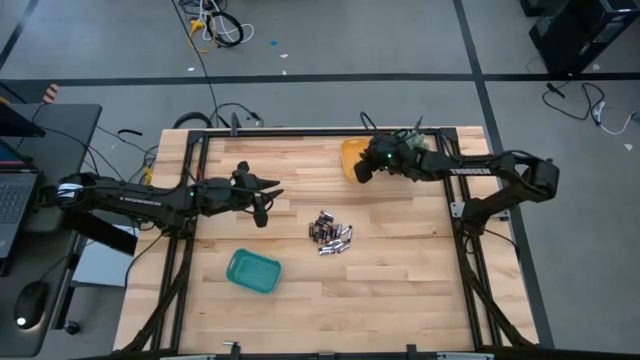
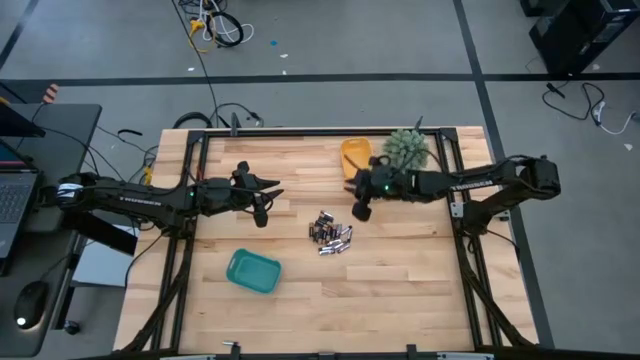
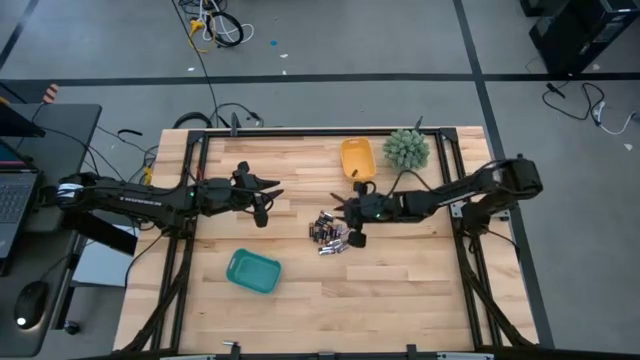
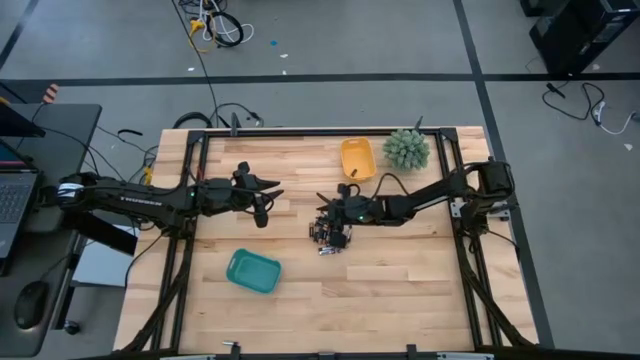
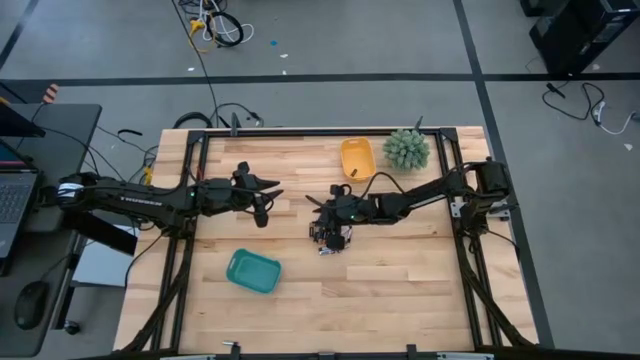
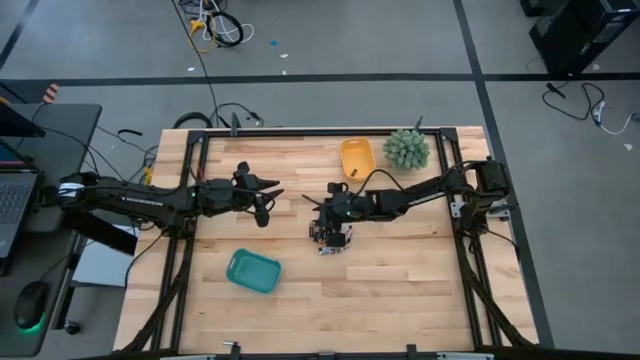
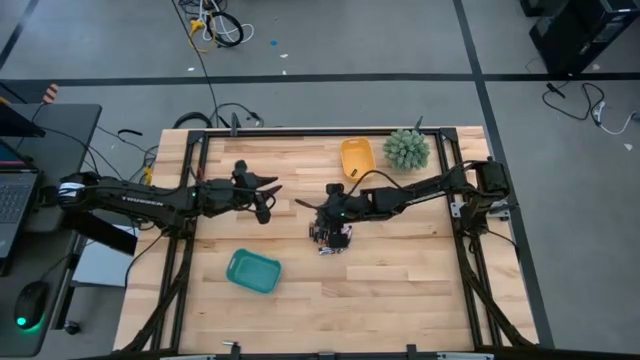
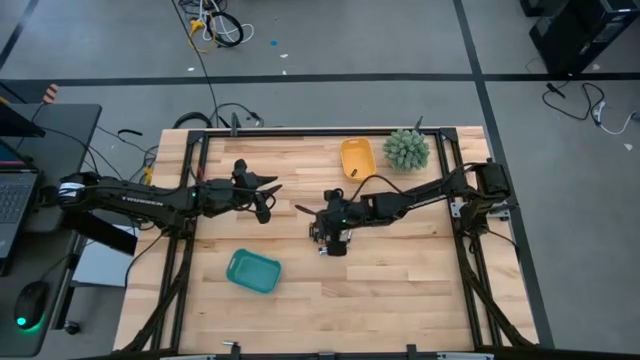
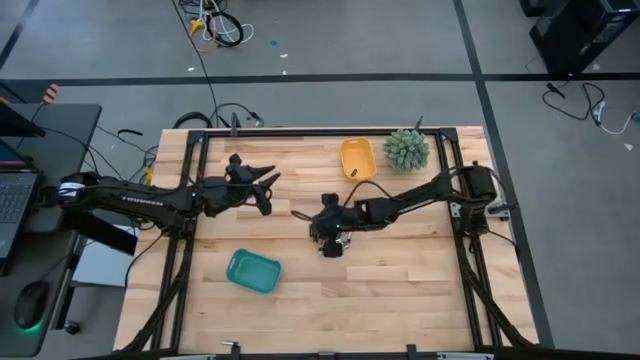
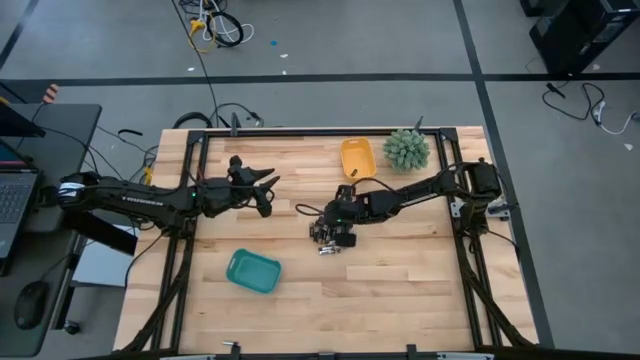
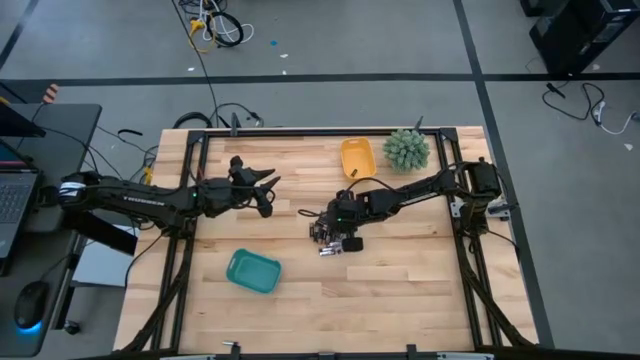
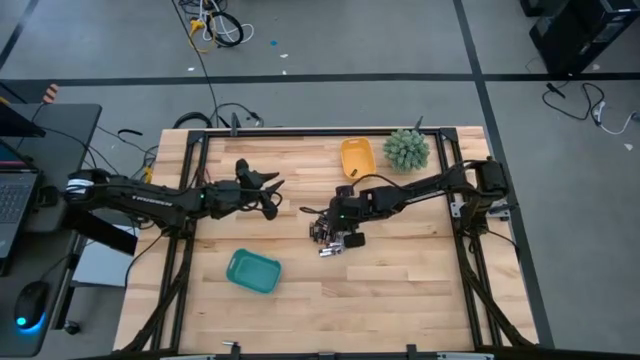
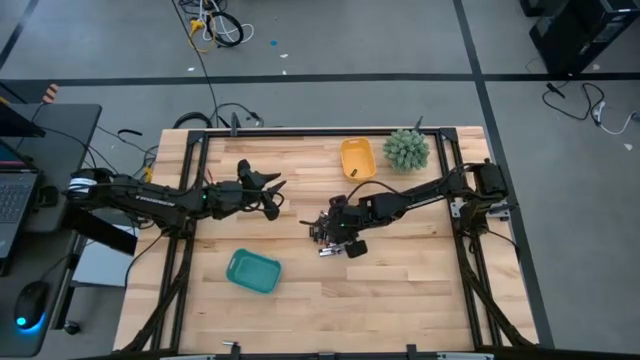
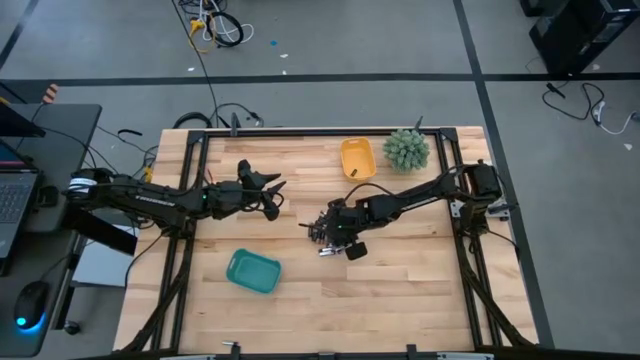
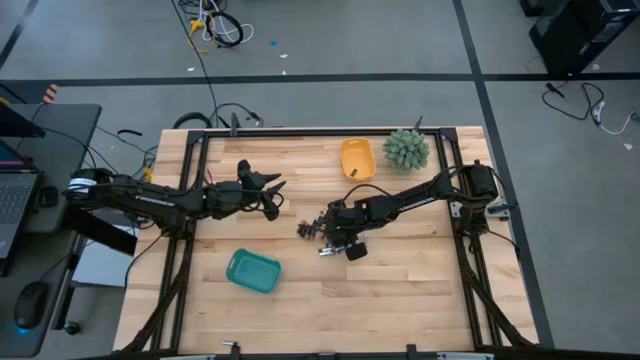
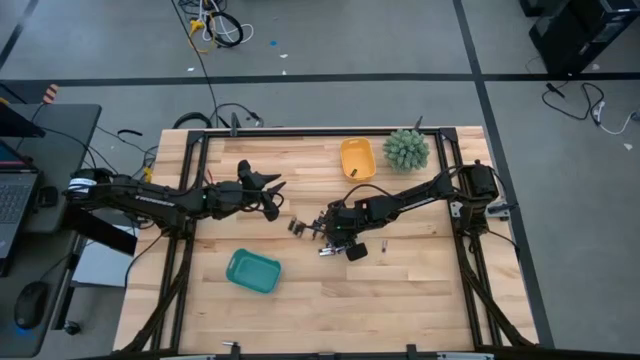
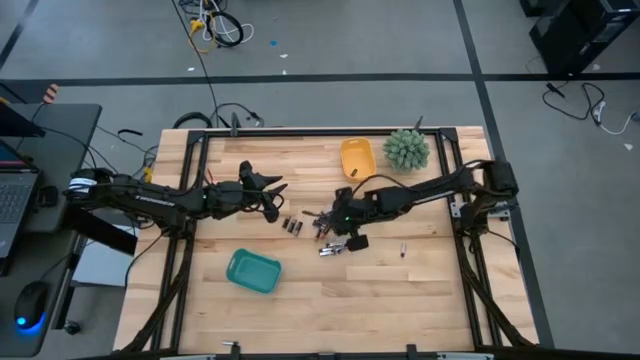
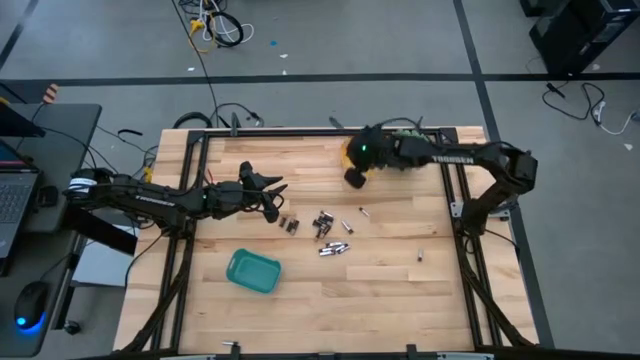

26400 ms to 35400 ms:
Task: Sort batteries
Put the black battery into the yellow bin

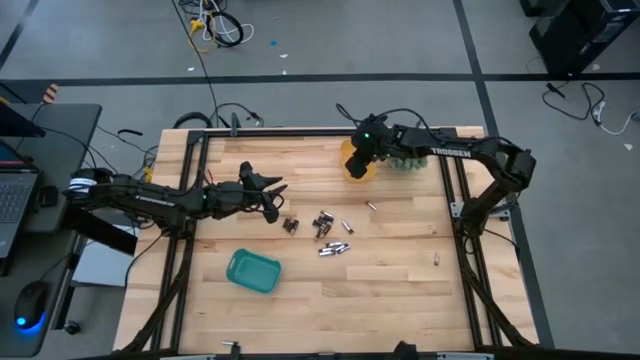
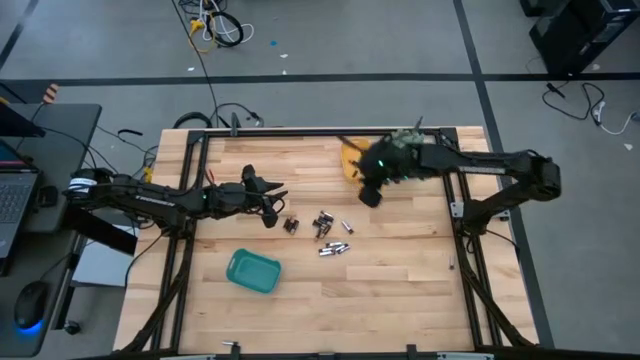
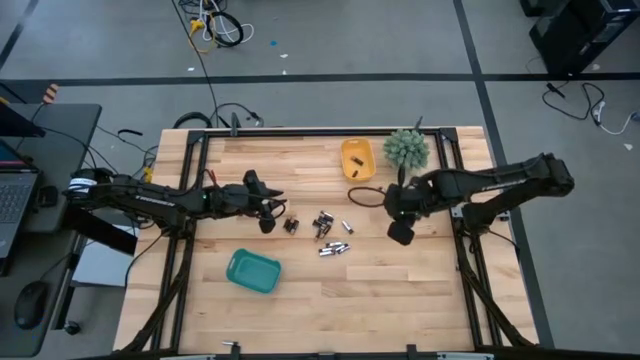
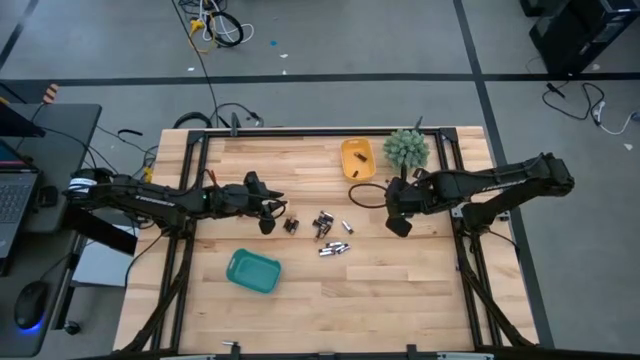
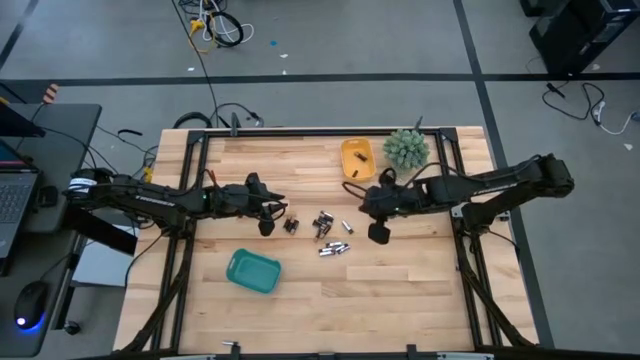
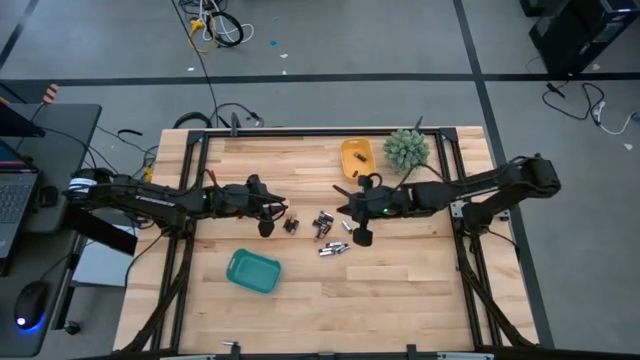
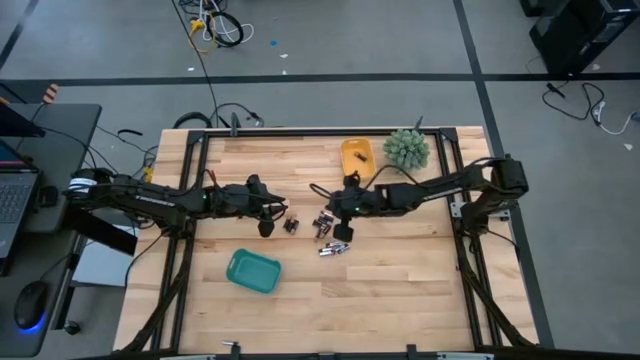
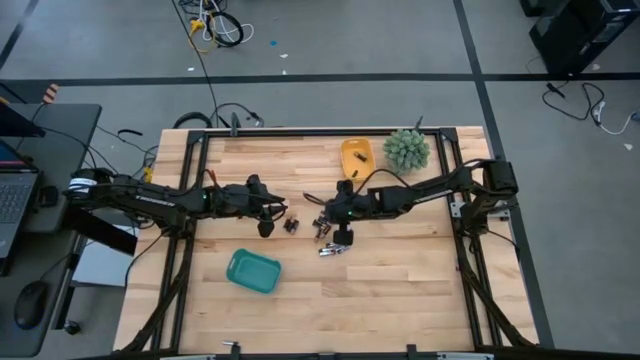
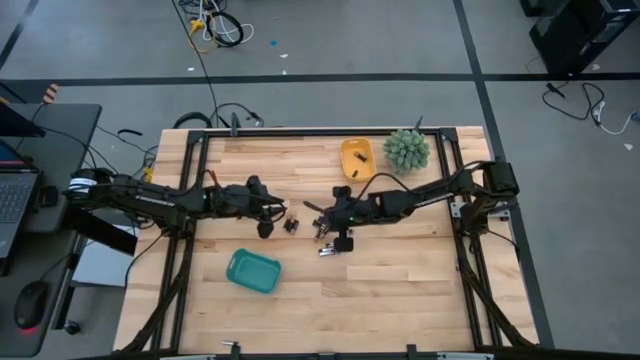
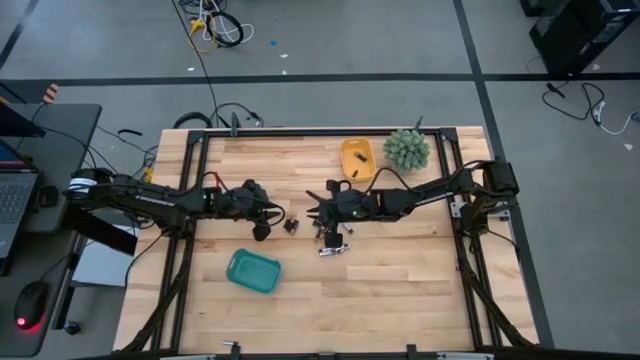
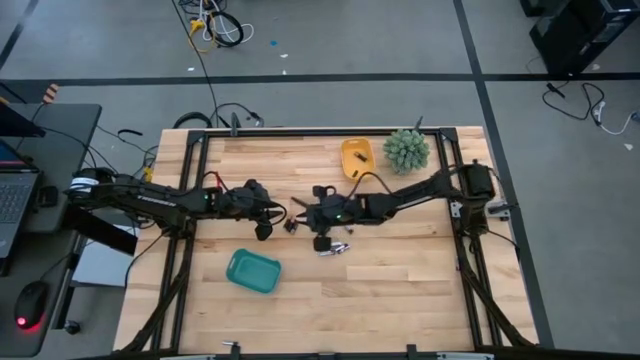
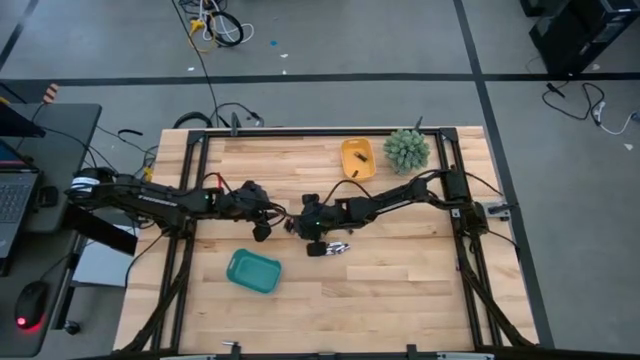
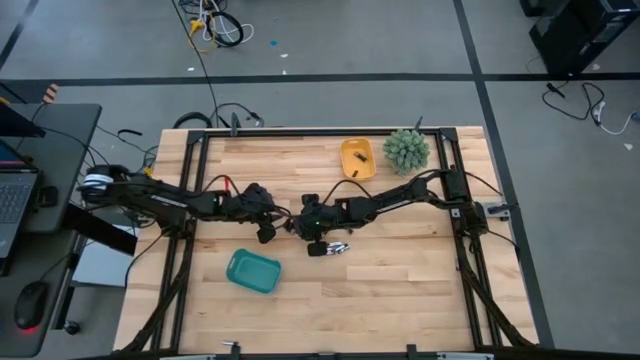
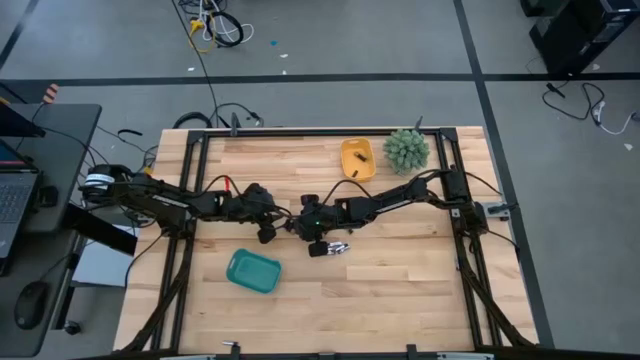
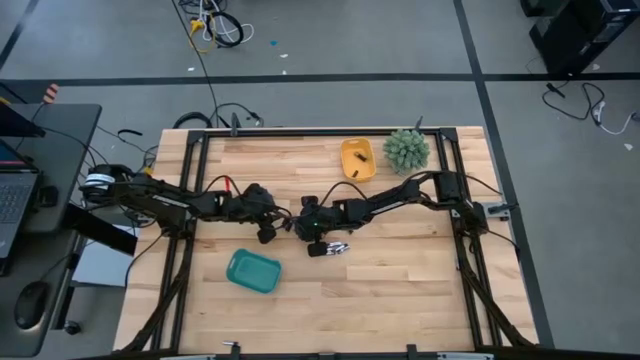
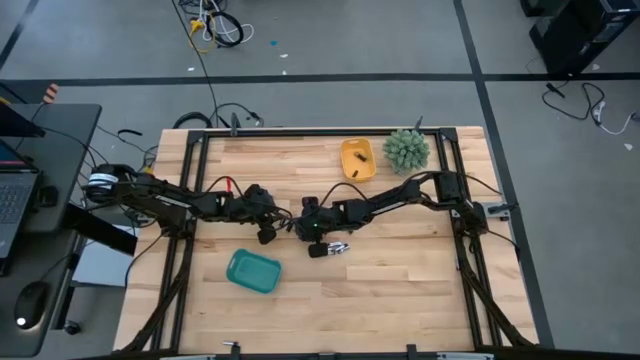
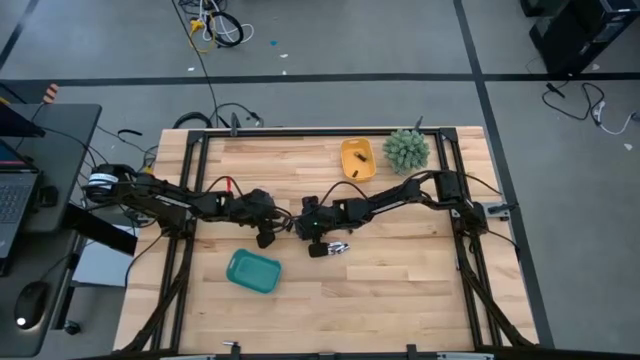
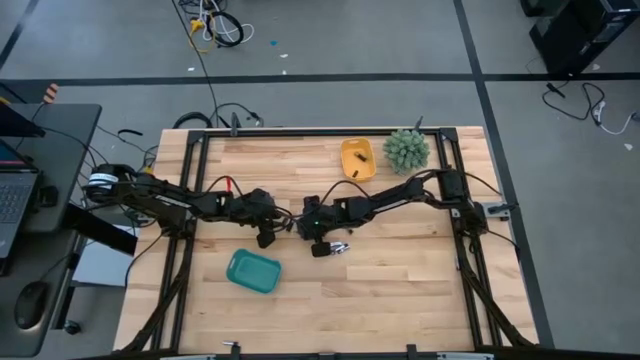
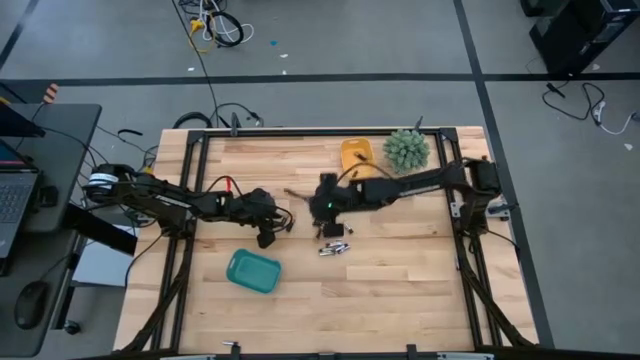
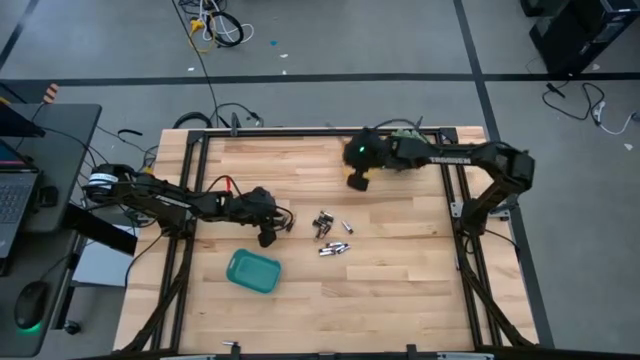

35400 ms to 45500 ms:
Put the black battery into the yellow bin

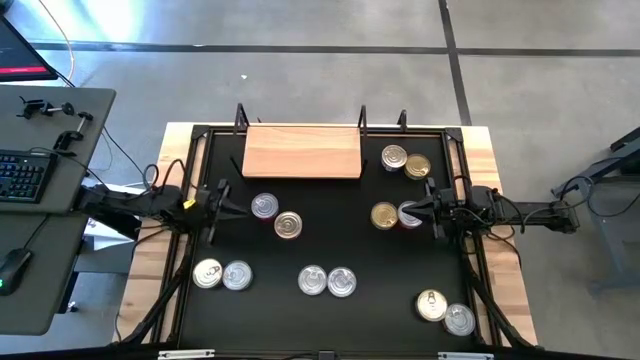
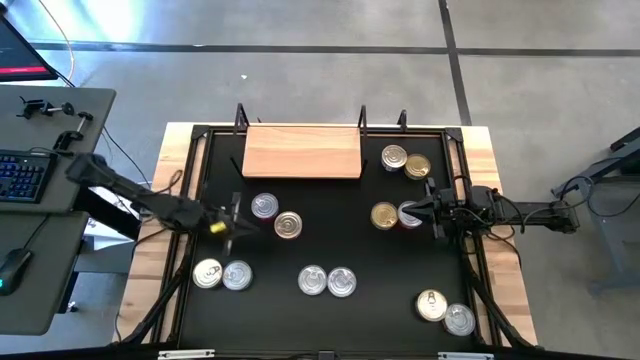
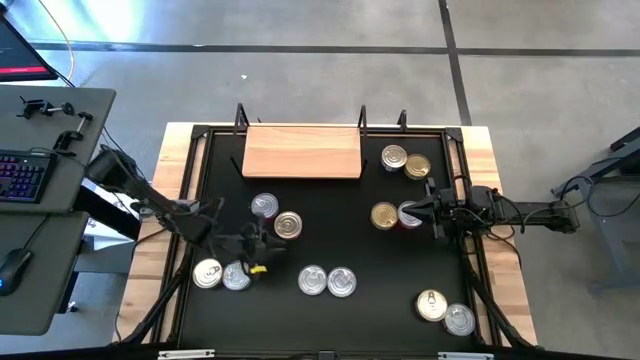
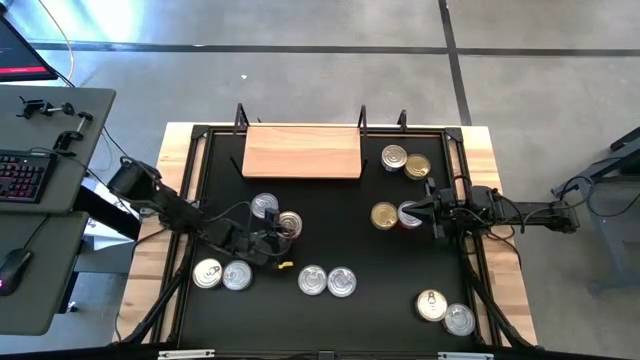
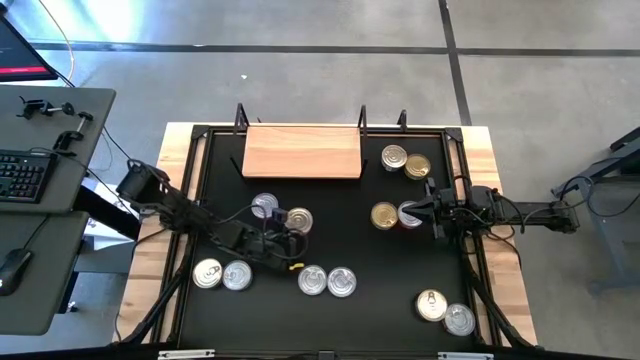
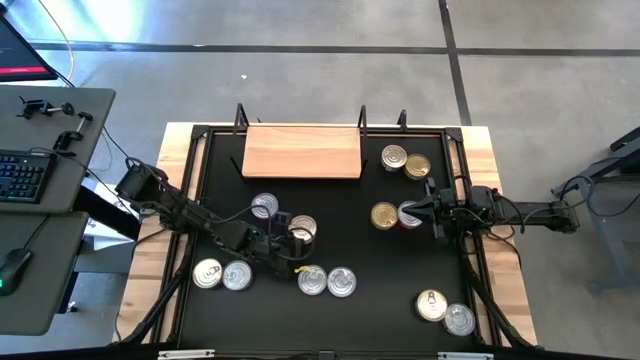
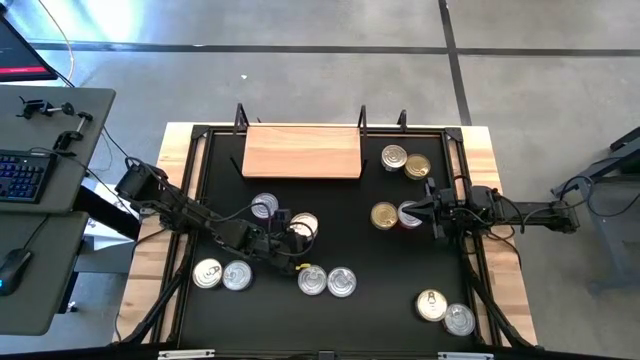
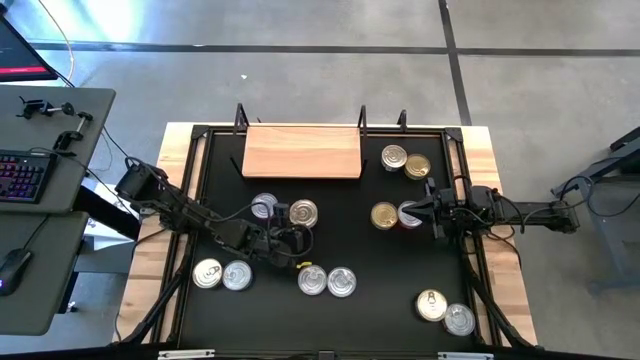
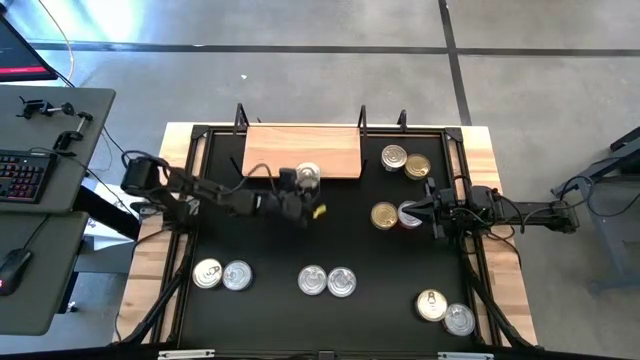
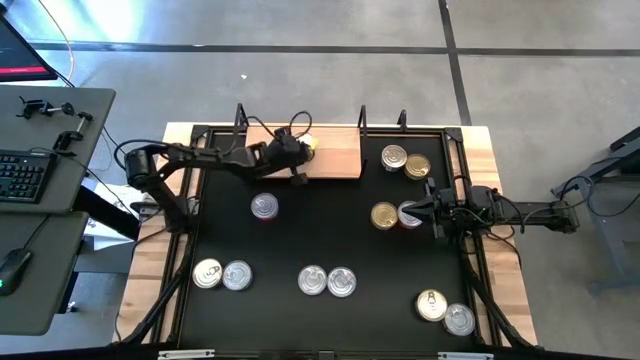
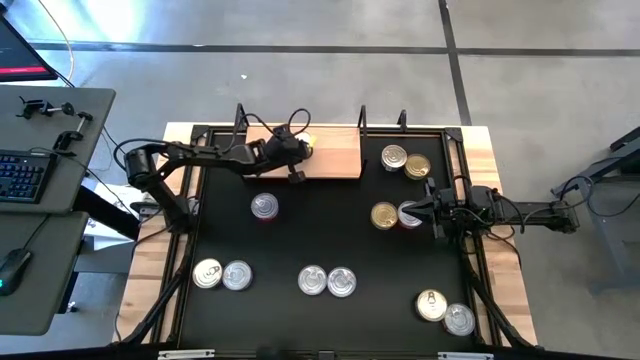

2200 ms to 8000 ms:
Task: Stack canned seafood by type on shelf
Put the blue and pink tuna can on the shelf
